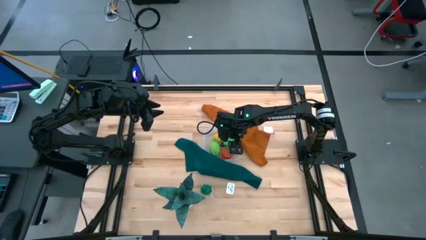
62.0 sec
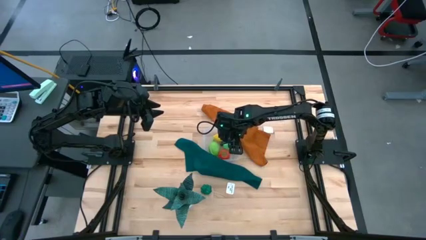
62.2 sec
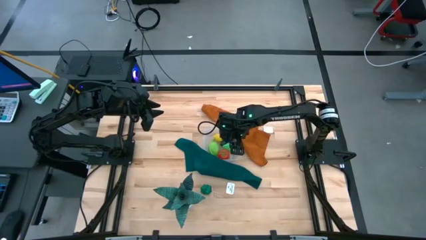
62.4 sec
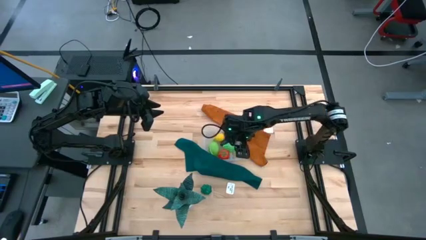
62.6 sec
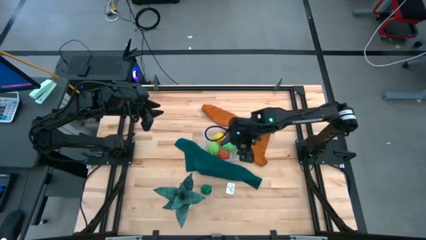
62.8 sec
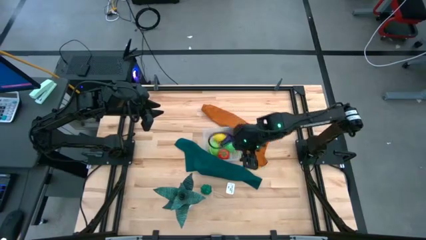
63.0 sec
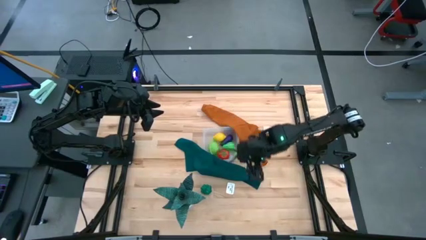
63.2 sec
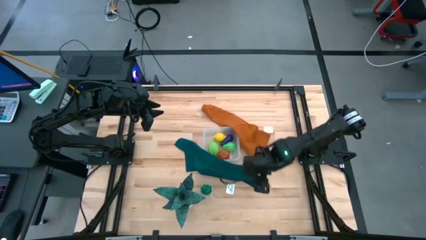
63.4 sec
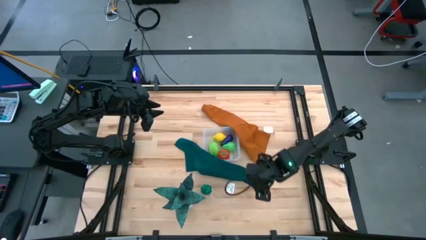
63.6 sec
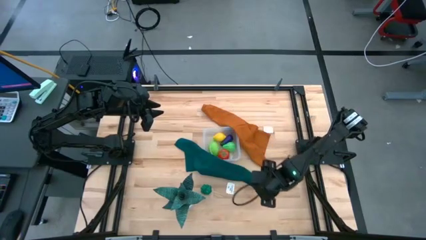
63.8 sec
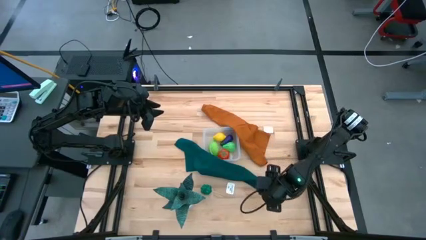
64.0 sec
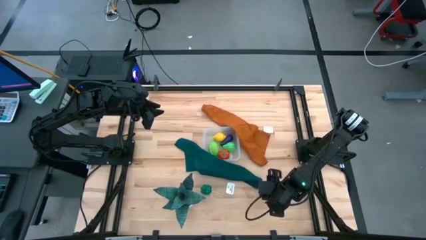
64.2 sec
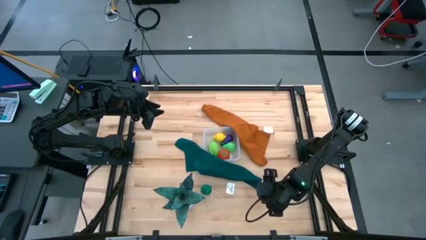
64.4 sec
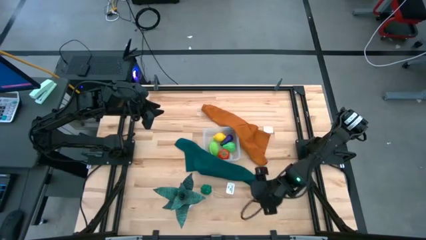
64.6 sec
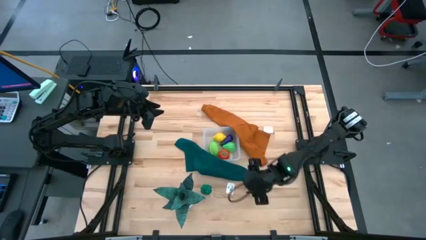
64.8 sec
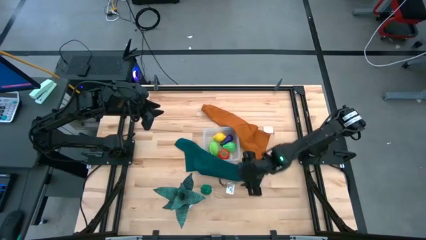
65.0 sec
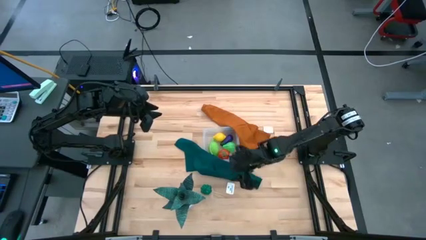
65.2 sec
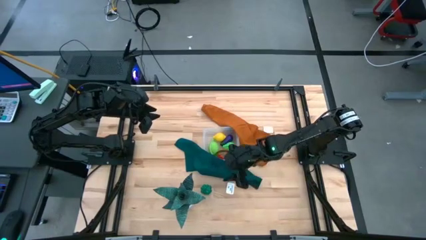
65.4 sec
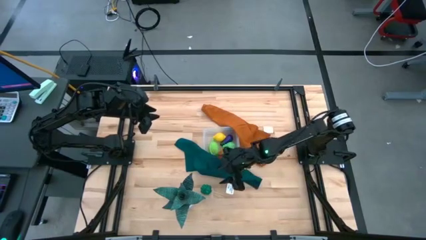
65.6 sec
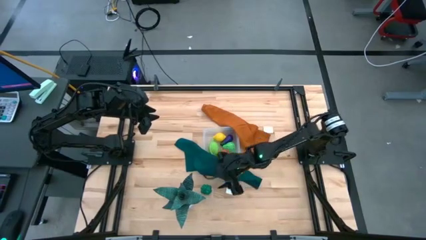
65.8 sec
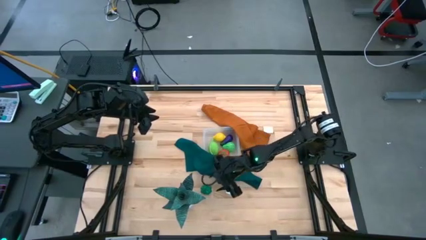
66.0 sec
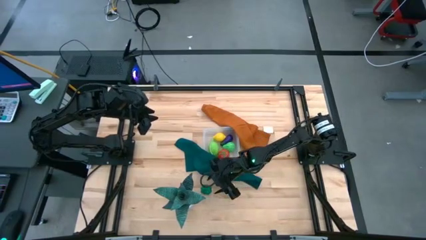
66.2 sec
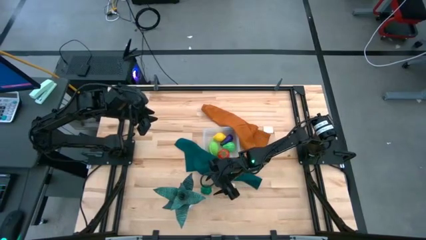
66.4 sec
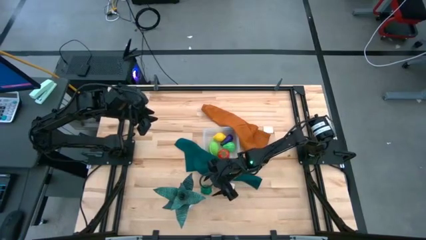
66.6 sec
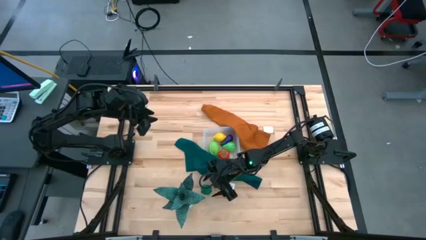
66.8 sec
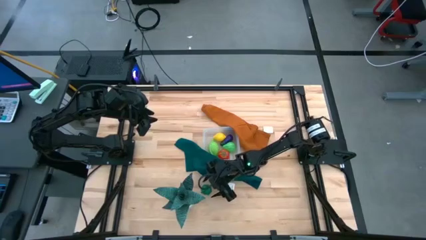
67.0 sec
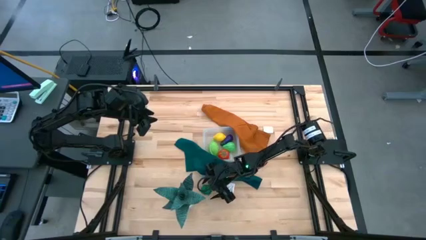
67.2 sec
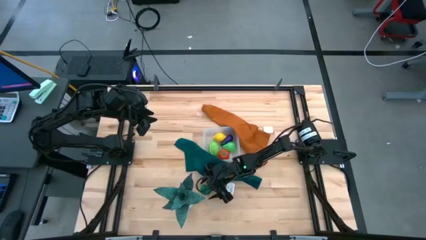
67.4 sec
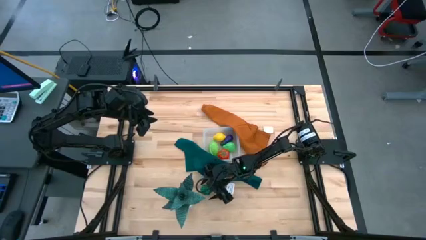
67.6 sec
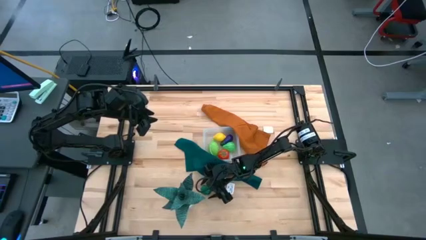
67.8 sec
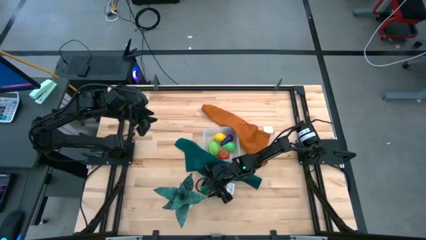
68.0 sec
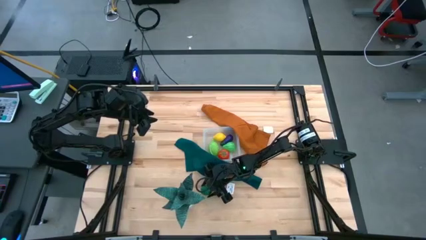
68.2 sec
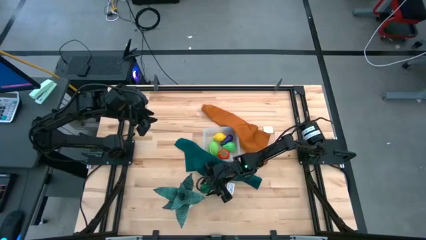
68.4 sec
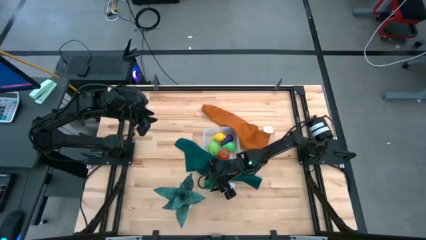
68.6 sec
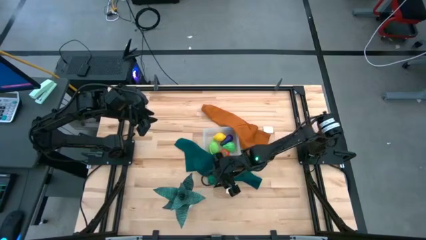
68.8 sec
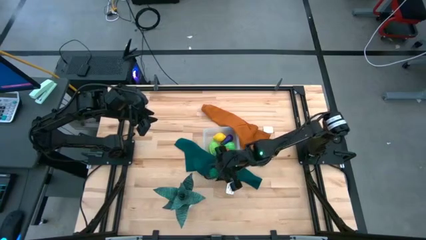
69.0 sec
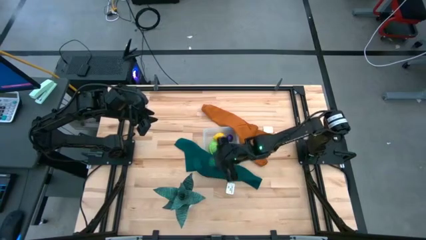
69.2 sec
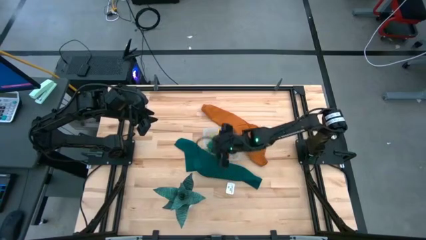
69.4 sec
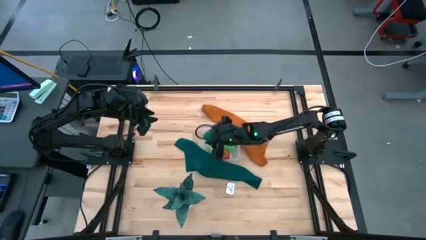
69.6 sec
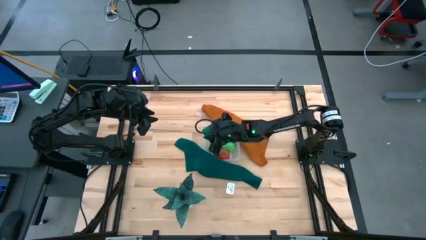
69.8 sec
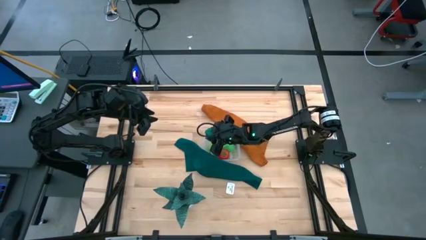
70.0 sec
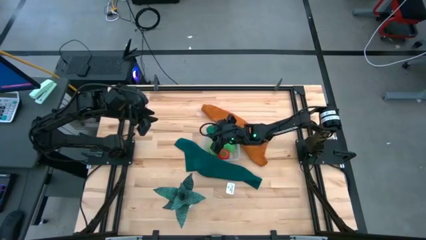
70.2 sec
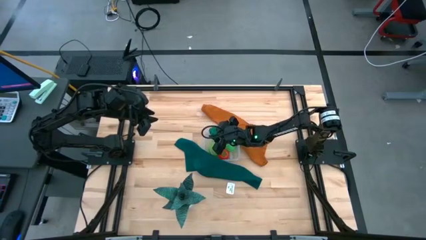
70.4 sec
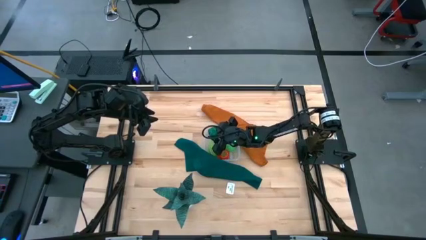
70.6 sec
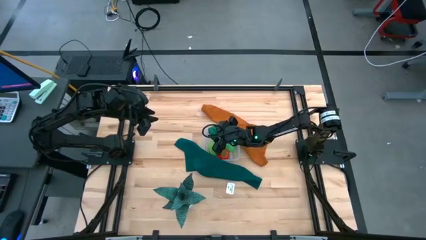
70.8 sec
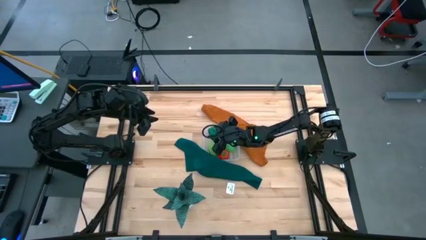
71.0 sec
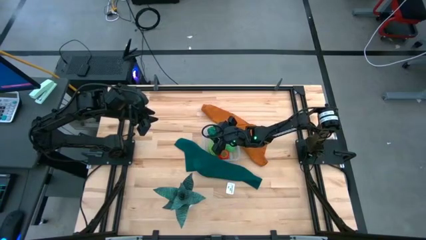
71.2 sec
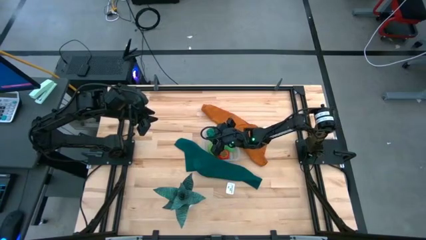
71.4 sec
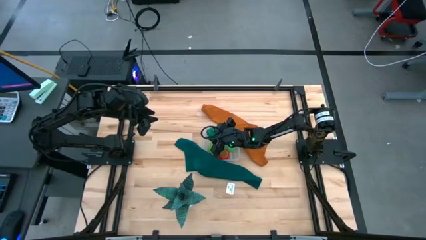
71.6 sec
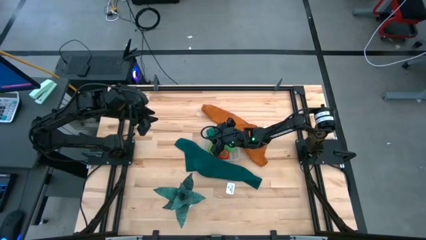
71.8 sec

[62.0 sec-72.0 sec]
Task: Pick and placing Produce into tupperware
Put the green bell pepper into the transparent bin
